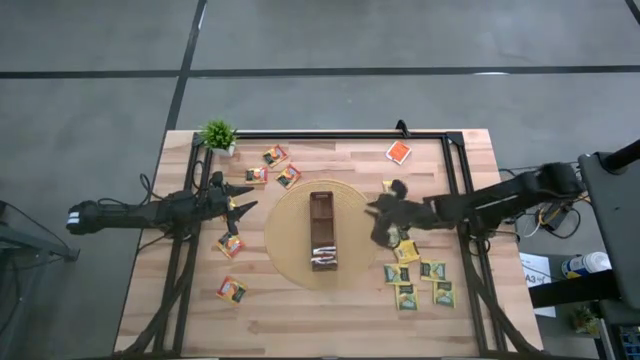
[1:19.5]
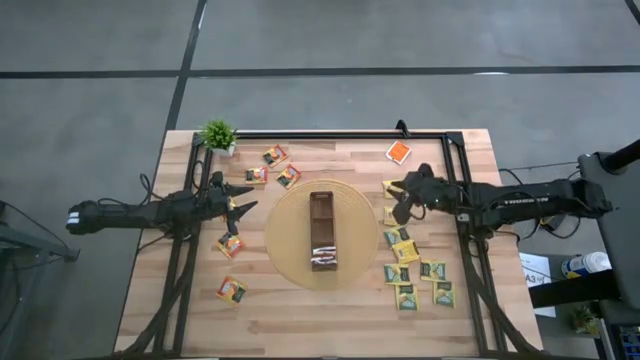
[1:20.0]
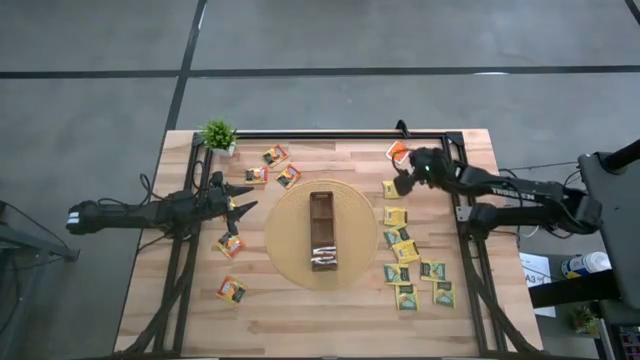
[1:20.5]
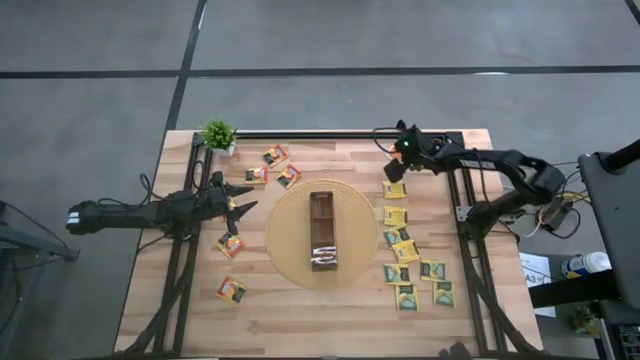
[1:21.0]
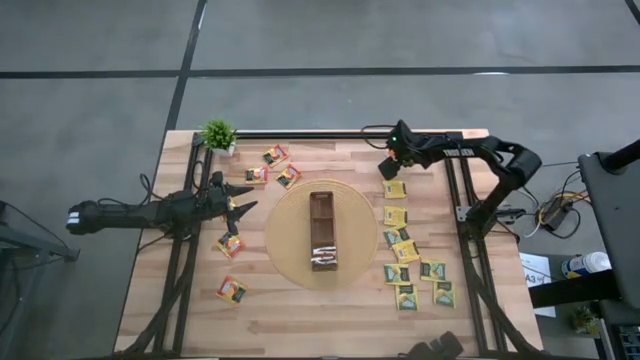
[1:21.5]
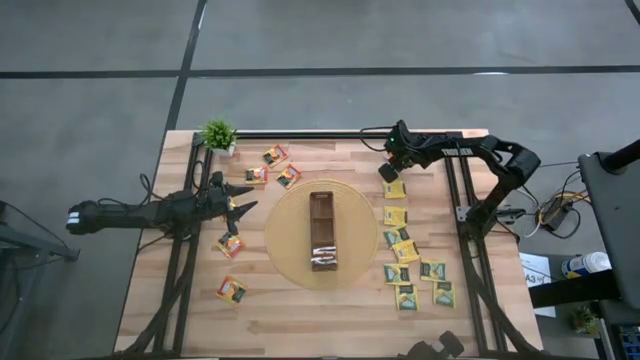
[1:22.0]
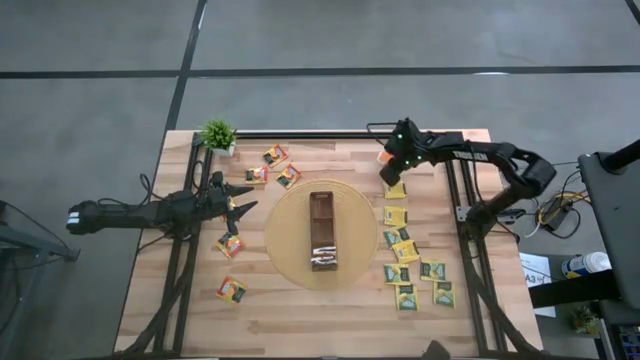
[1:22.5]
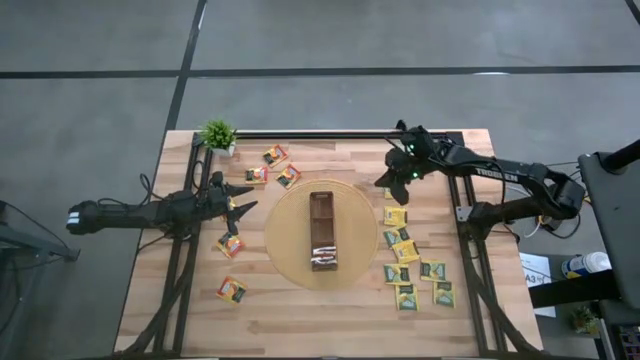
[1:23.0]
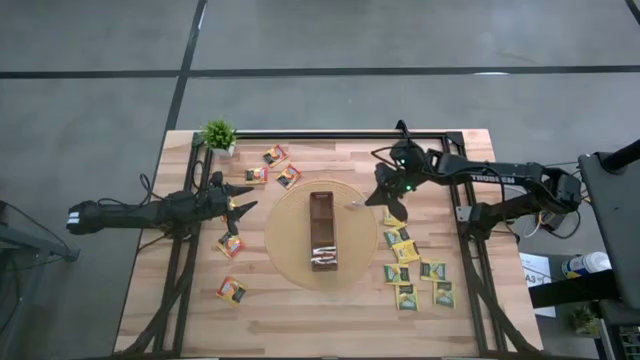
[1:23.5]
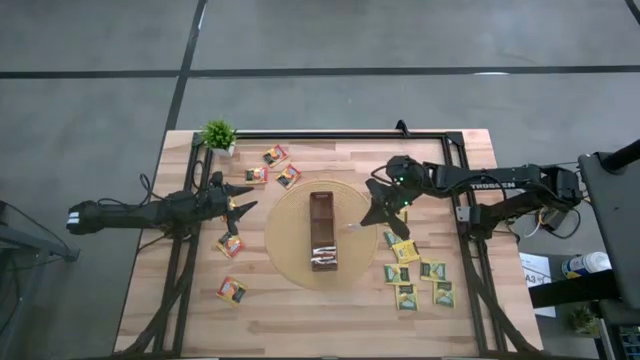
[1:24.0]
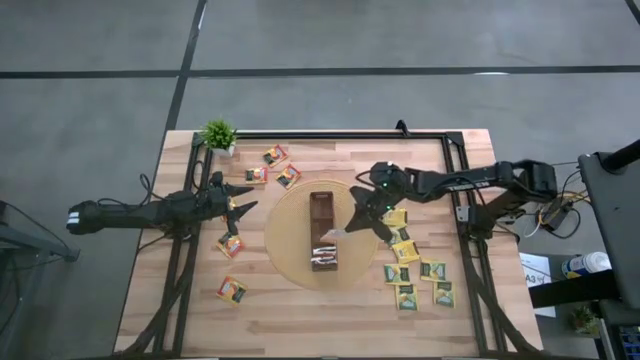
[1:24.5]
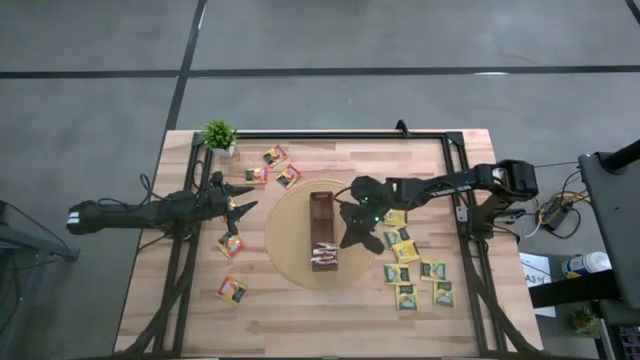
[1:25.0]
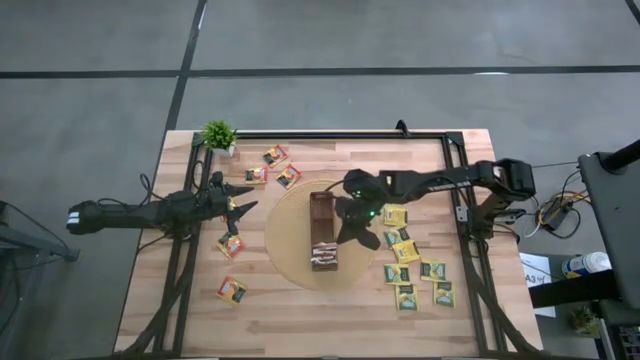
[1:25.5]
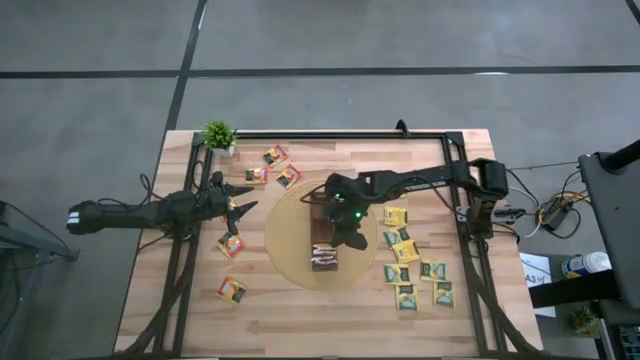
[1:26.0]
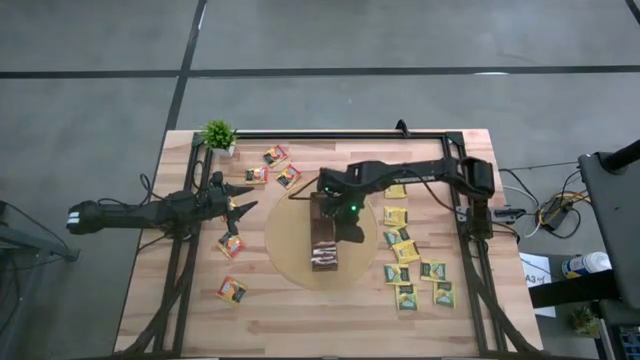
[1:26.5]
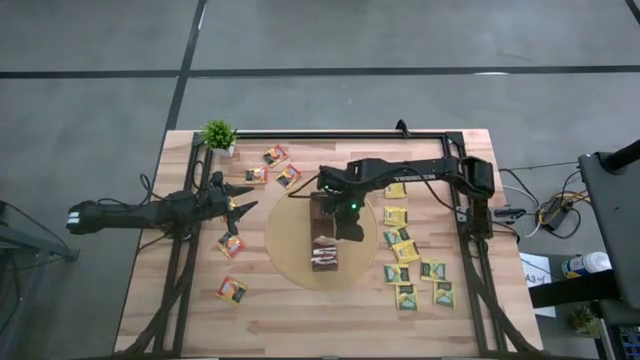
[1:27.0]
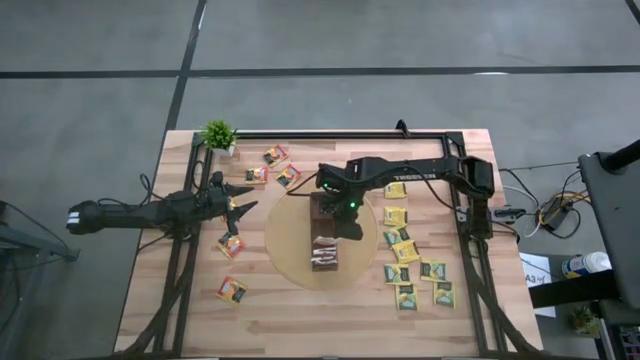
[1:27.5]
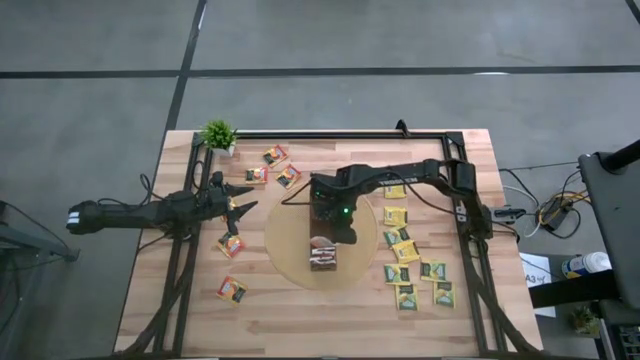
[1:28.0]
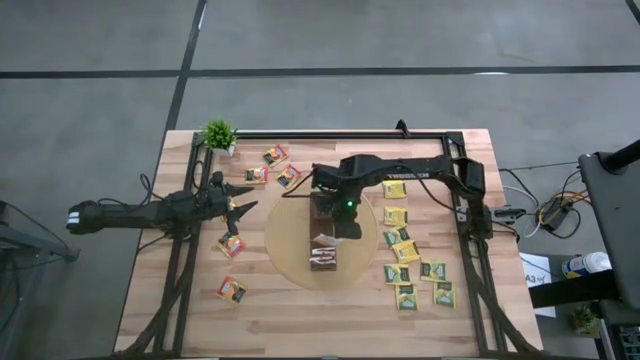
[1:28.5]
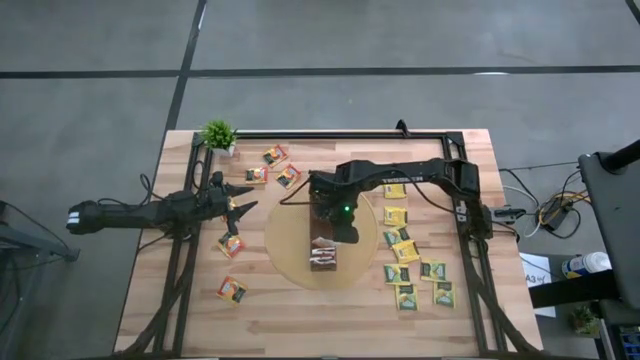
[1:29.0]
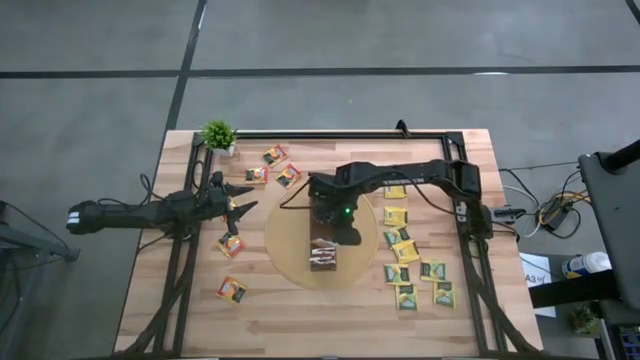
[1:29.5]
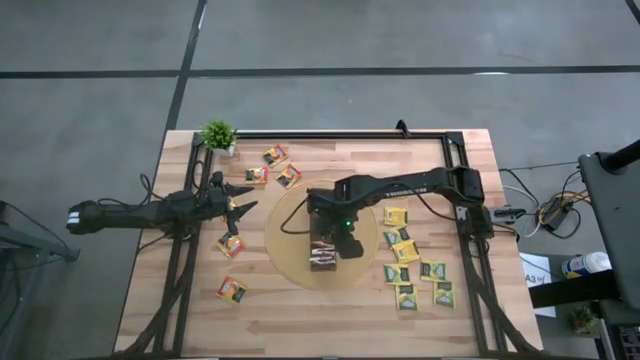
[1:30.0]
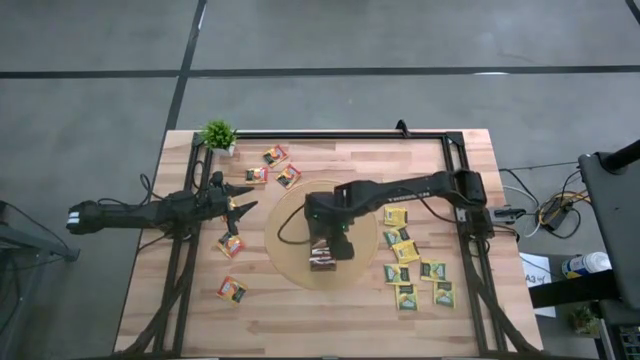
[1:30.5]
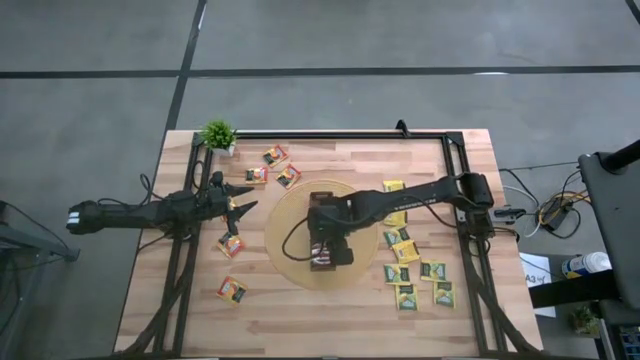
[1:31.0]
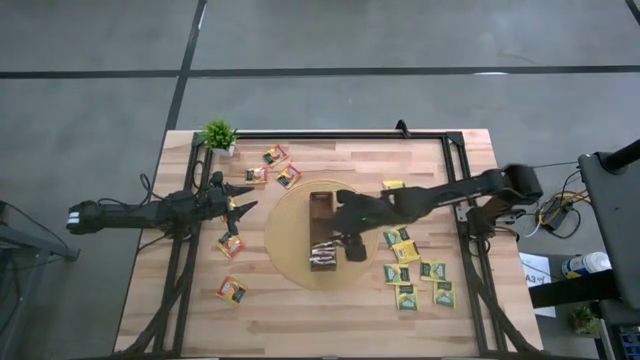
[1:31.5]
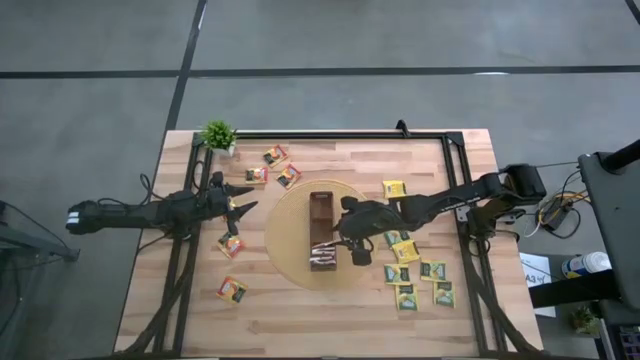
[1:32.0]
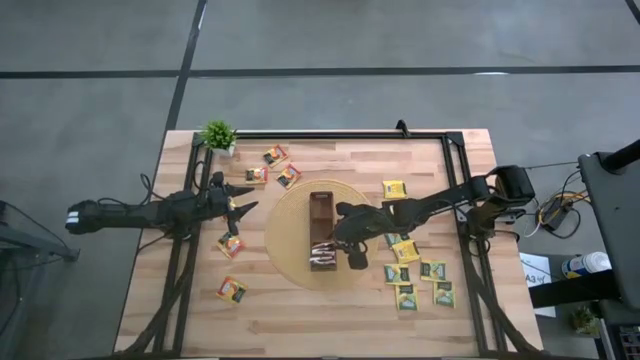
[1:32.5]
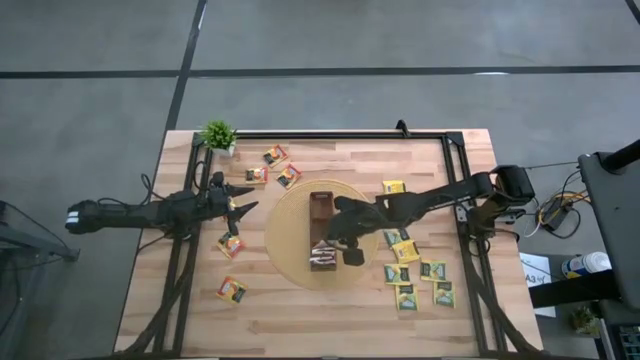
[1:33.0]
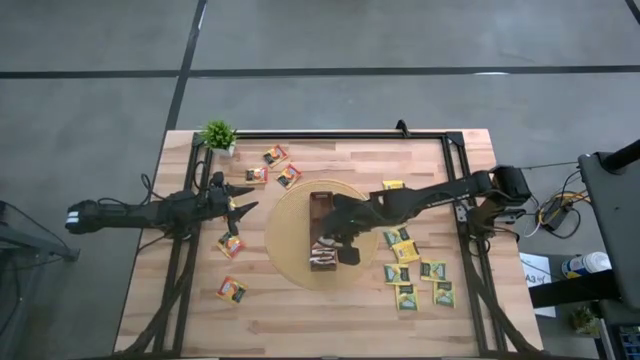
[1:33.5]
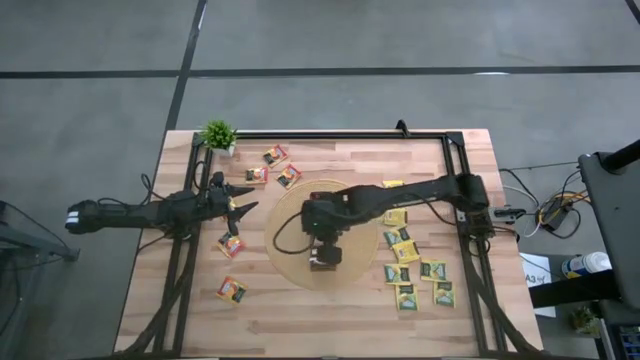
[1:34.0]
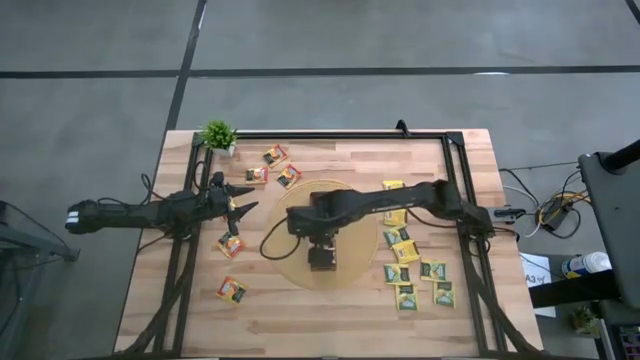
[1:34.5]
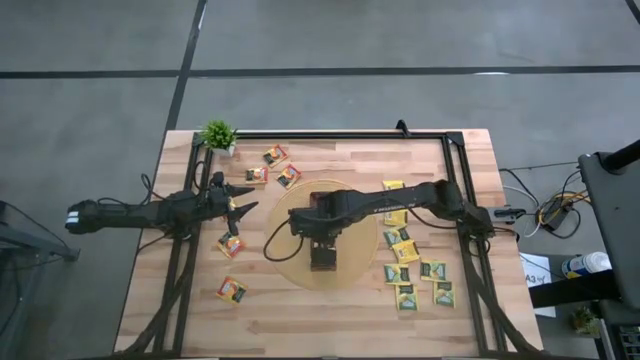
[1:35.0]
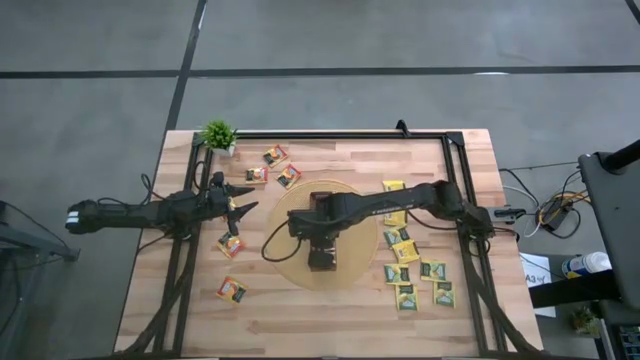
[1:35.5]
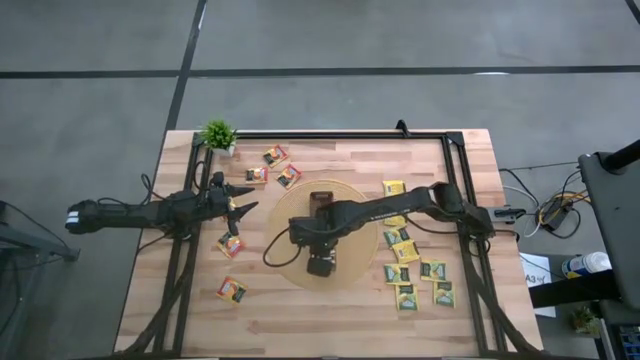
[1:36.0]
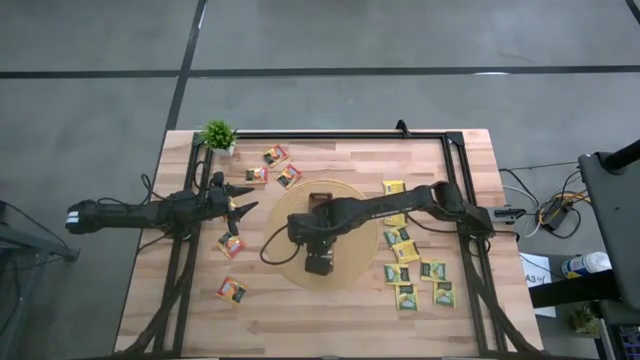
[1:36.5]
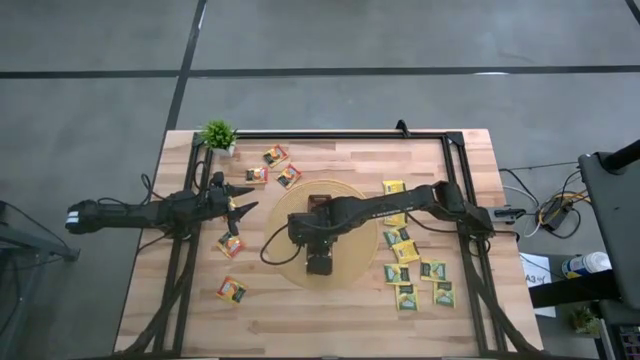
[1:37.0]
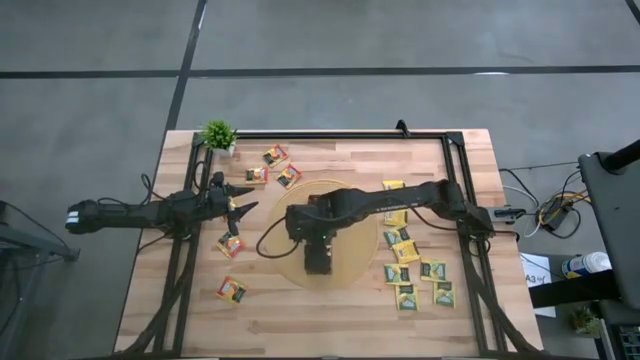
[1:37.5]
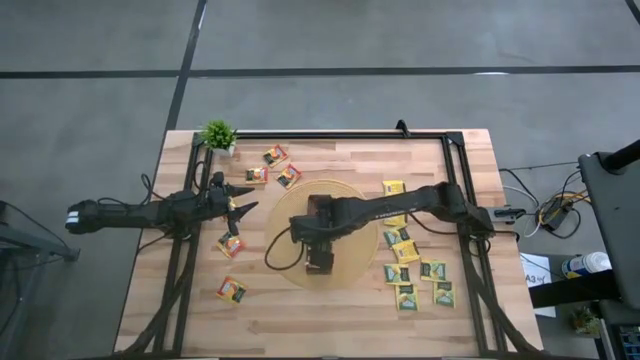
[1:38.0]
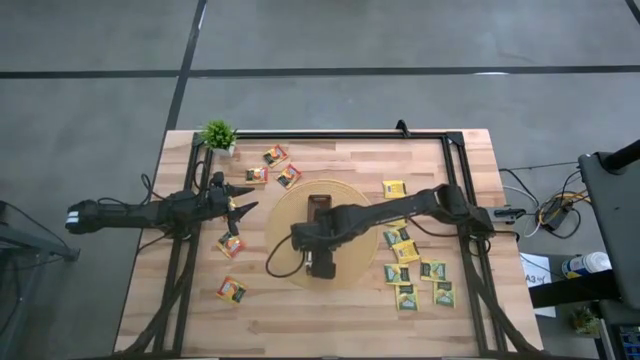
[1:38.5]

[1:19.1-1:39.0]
Task: Pick & Place Tea
Put the white tea bag into the bottom section of the wooden organizer

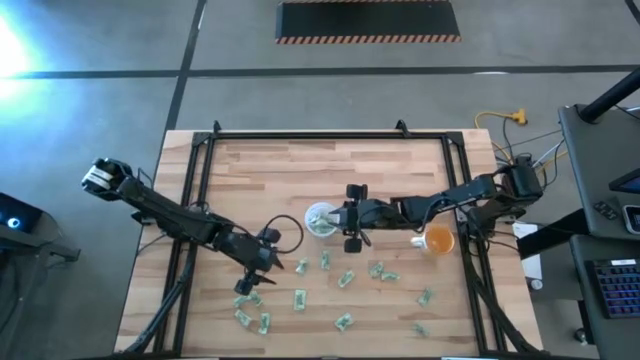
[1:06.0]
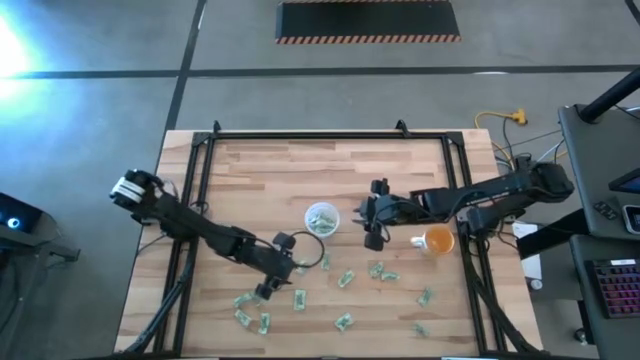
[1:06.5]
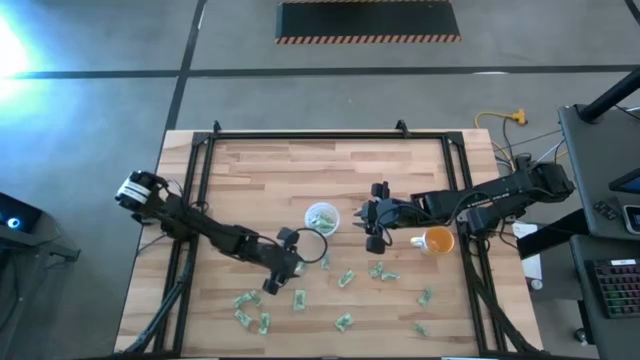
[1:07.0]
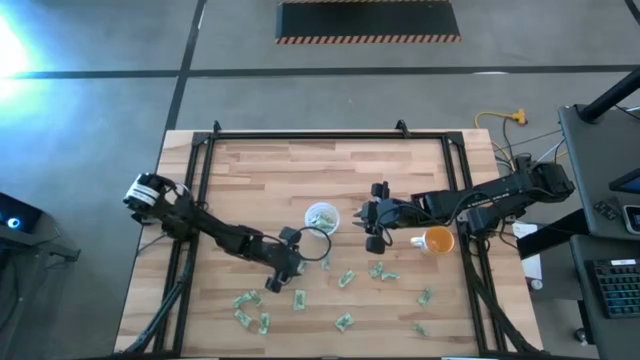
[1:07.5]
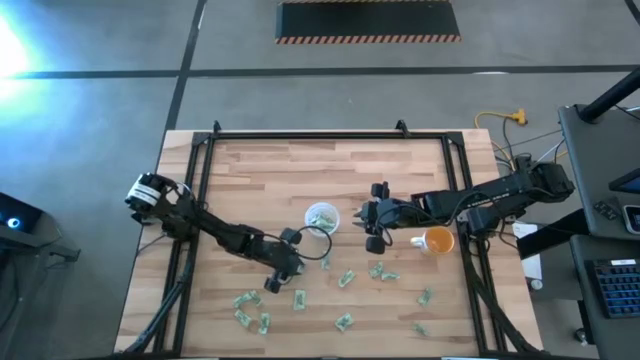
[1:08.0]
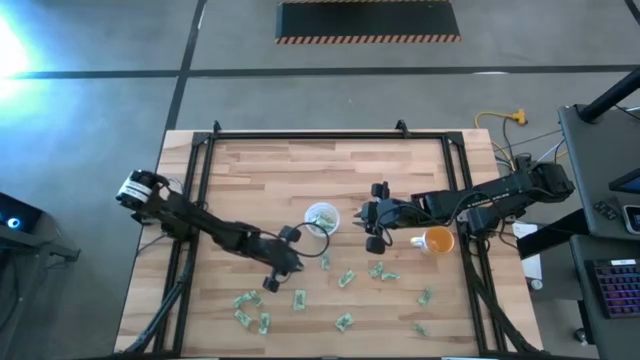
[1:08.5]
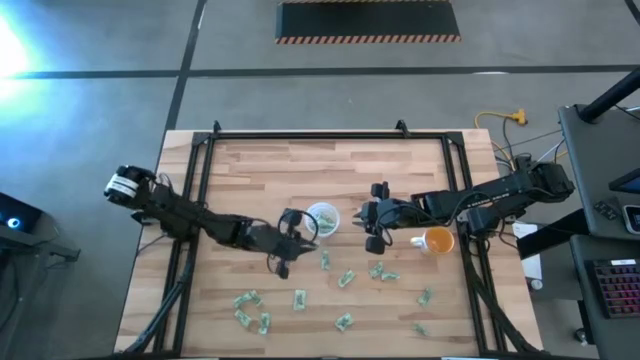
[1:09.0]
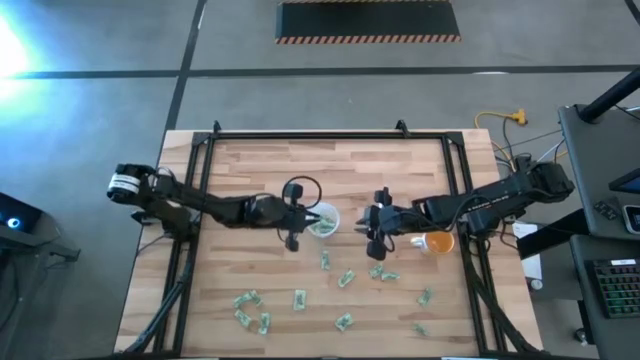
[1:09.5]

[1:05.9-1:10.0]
Task: Pick and place Stevia / Truvia into bins
Put the light green stevia packet into the transparent container
